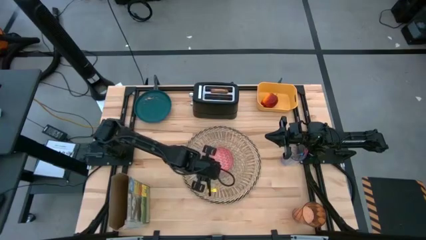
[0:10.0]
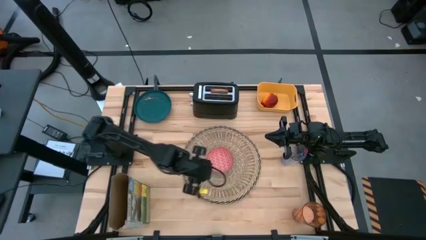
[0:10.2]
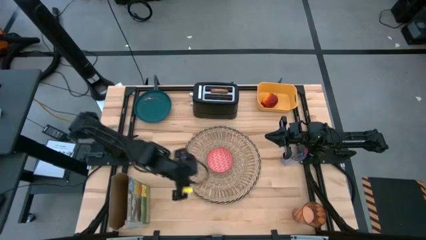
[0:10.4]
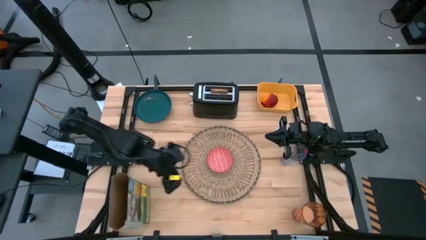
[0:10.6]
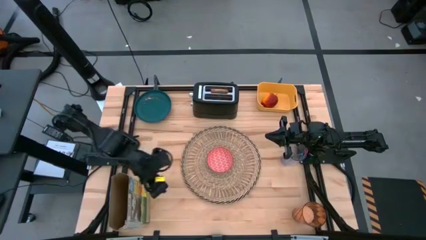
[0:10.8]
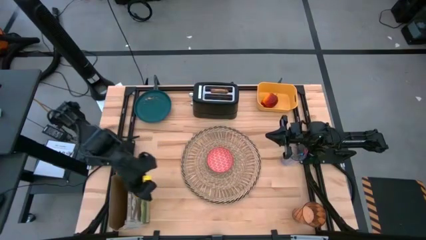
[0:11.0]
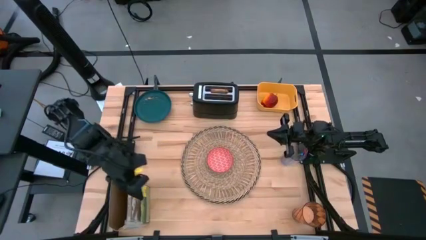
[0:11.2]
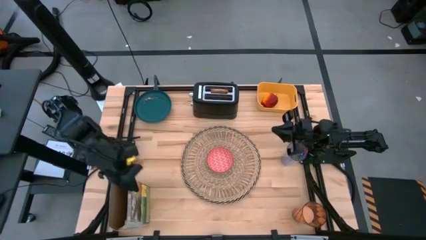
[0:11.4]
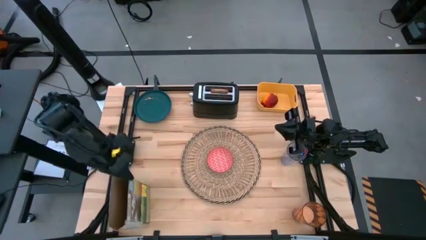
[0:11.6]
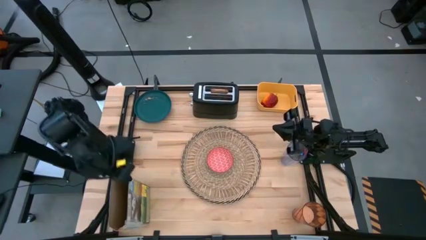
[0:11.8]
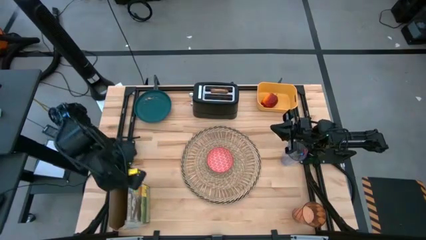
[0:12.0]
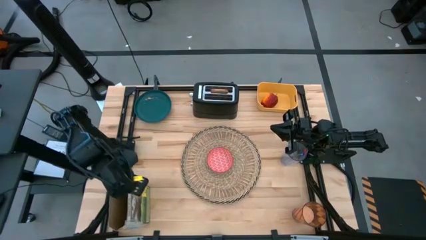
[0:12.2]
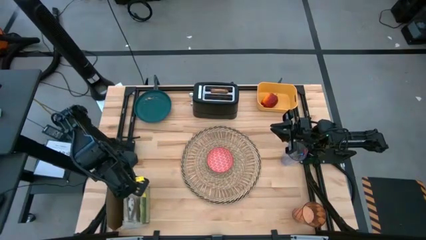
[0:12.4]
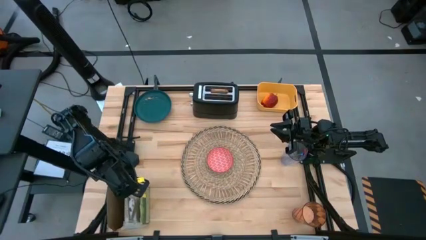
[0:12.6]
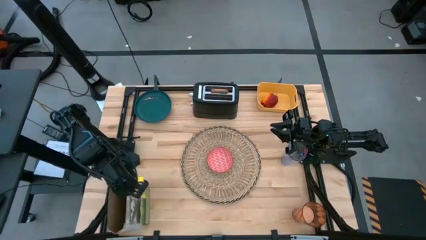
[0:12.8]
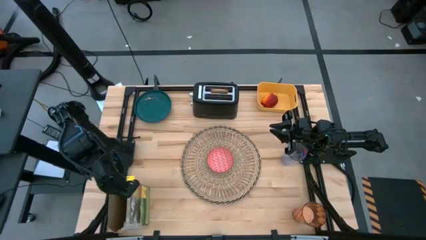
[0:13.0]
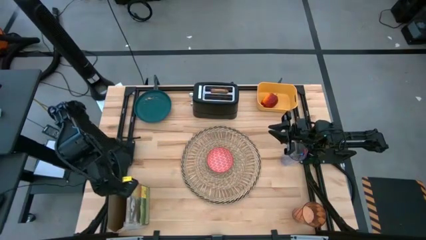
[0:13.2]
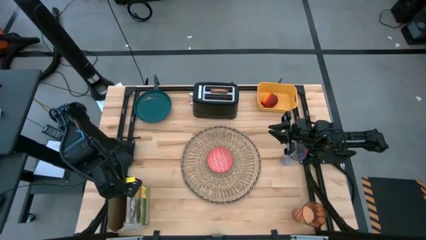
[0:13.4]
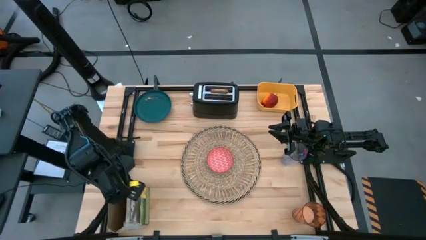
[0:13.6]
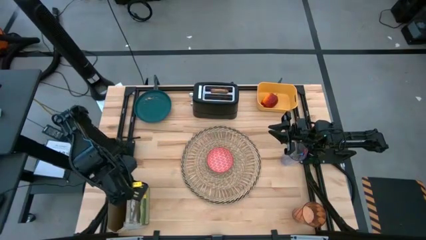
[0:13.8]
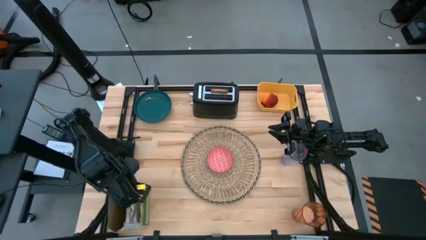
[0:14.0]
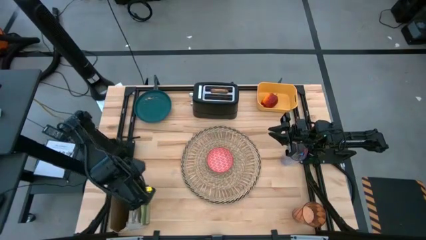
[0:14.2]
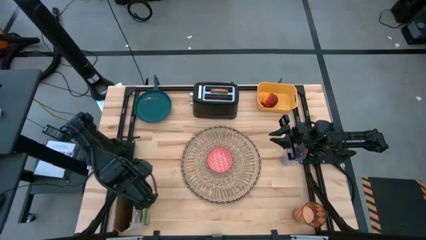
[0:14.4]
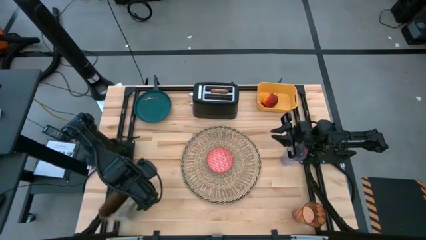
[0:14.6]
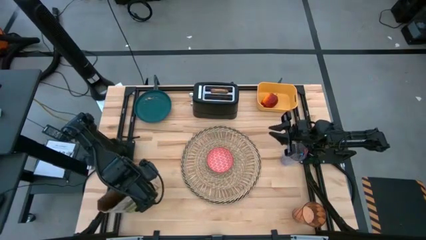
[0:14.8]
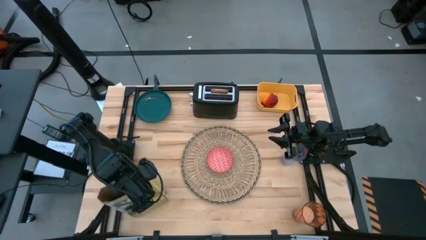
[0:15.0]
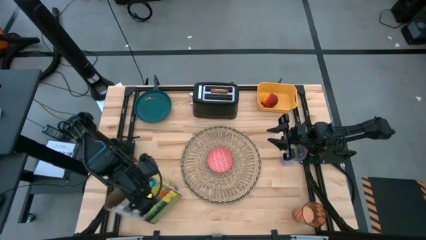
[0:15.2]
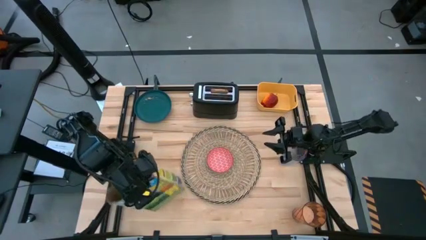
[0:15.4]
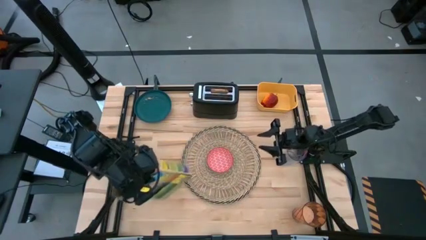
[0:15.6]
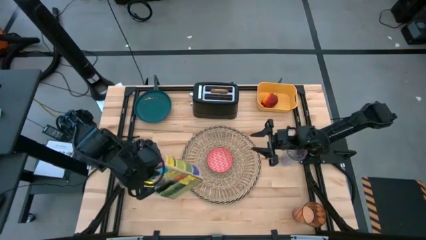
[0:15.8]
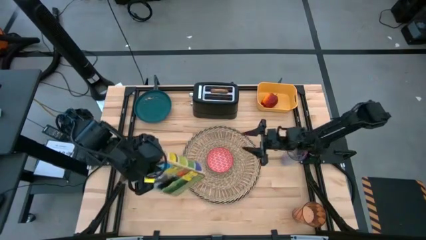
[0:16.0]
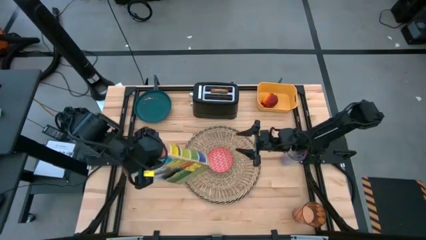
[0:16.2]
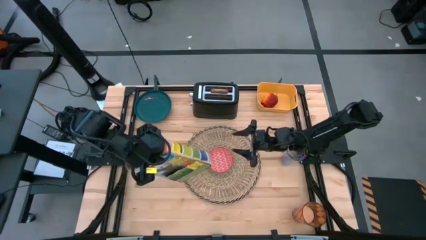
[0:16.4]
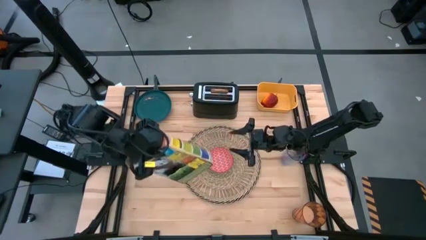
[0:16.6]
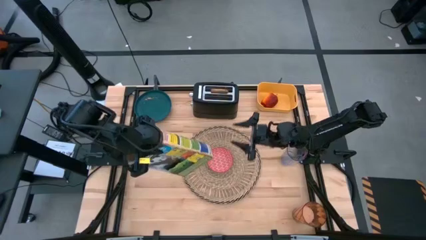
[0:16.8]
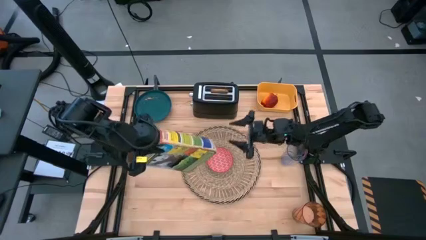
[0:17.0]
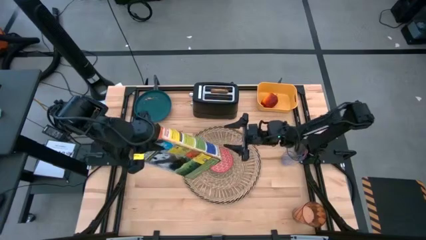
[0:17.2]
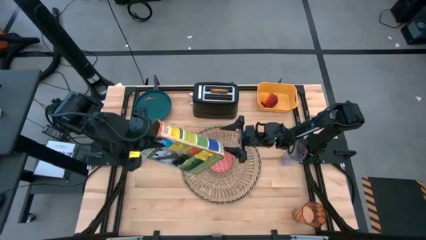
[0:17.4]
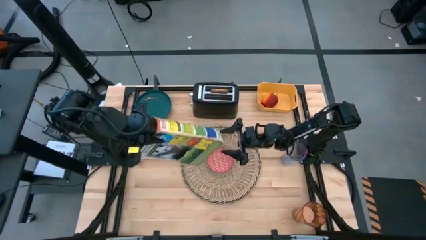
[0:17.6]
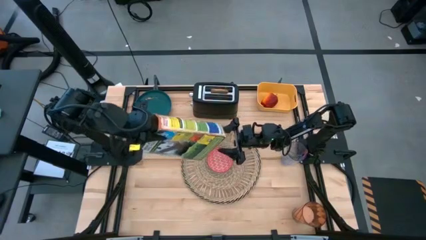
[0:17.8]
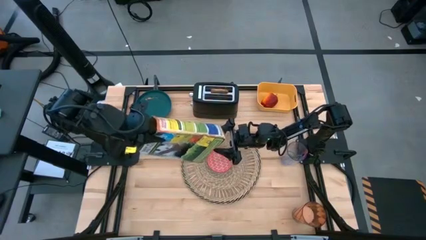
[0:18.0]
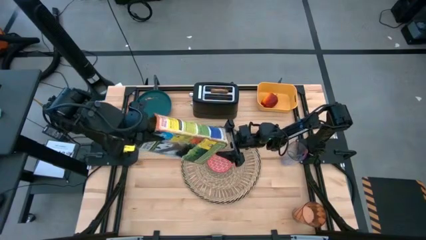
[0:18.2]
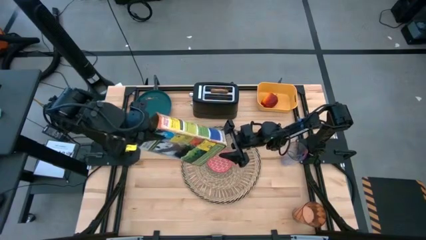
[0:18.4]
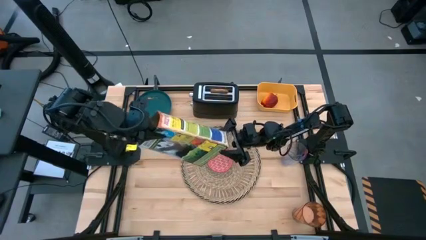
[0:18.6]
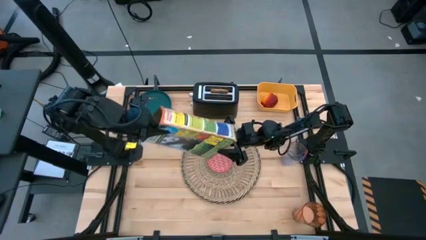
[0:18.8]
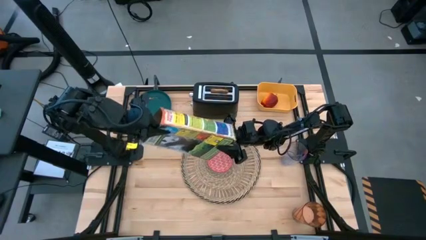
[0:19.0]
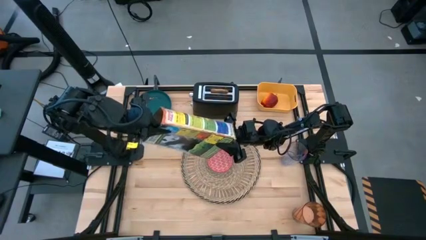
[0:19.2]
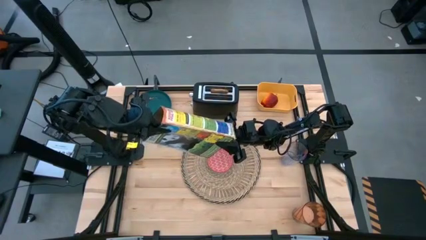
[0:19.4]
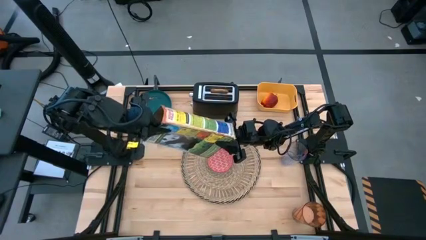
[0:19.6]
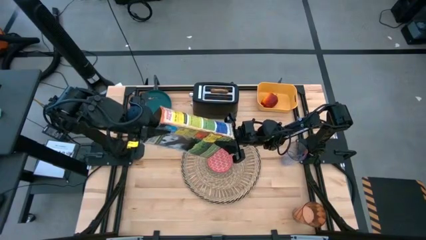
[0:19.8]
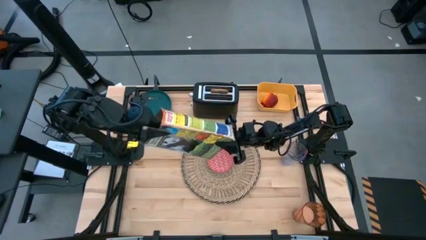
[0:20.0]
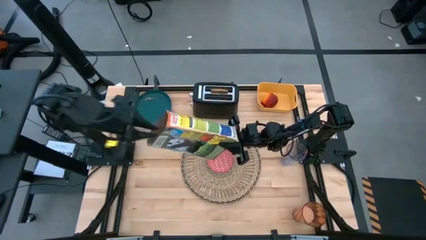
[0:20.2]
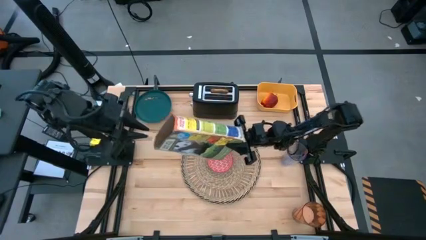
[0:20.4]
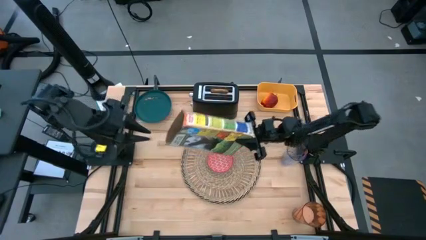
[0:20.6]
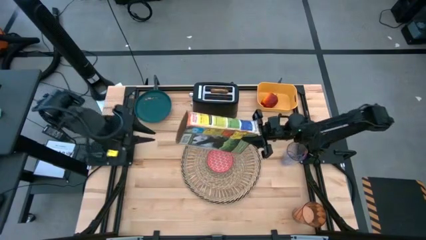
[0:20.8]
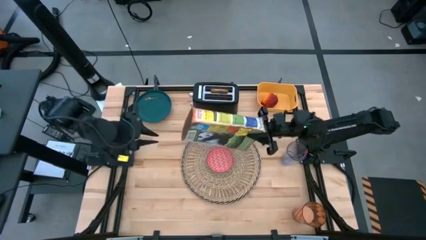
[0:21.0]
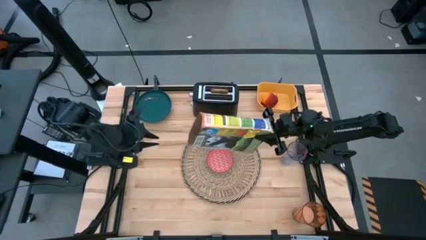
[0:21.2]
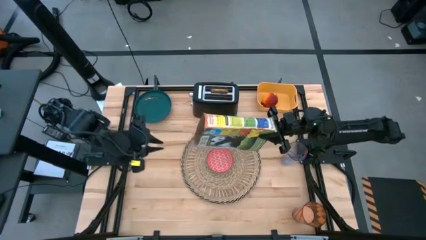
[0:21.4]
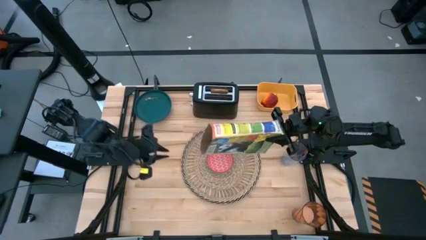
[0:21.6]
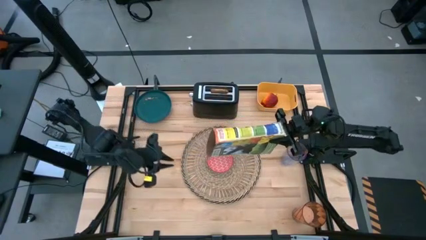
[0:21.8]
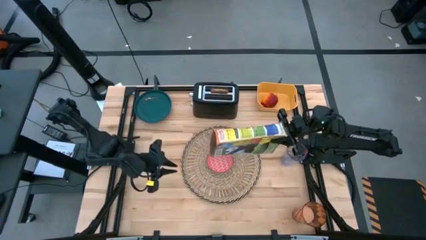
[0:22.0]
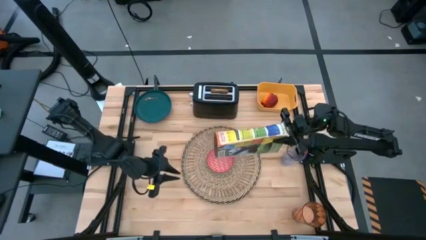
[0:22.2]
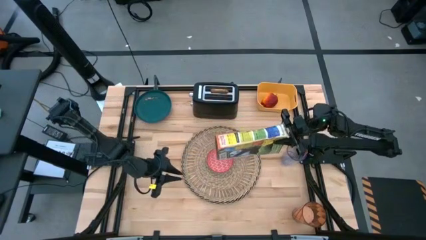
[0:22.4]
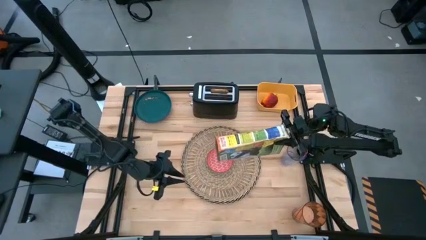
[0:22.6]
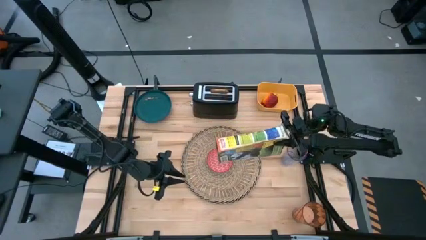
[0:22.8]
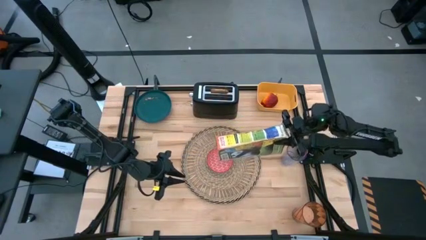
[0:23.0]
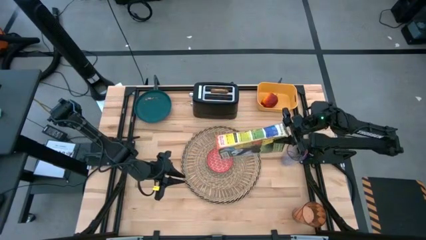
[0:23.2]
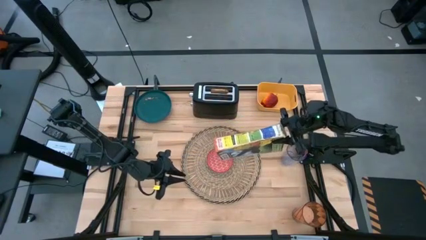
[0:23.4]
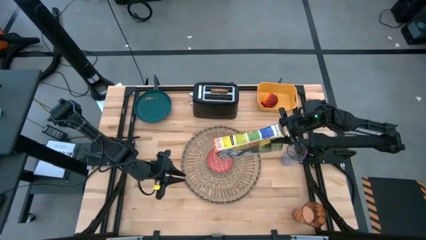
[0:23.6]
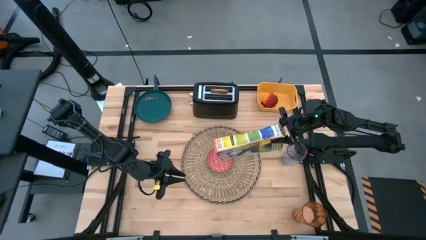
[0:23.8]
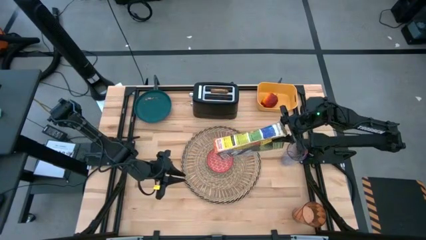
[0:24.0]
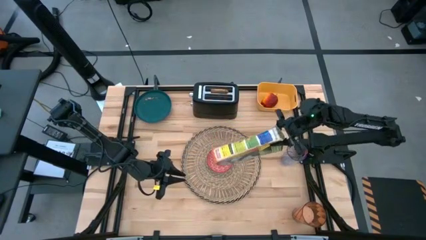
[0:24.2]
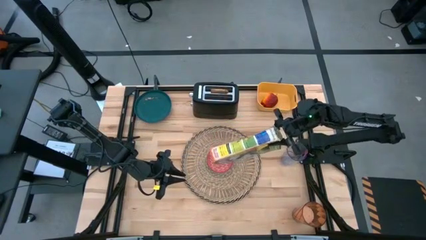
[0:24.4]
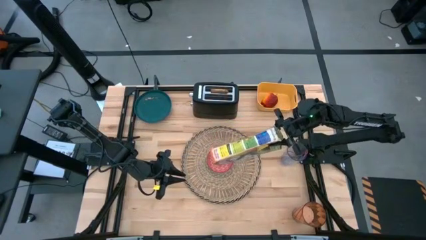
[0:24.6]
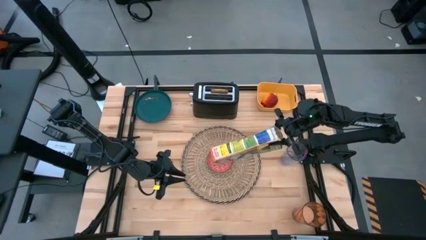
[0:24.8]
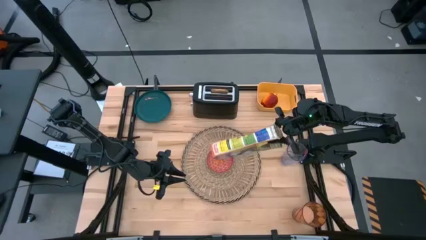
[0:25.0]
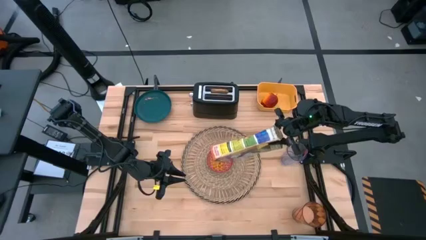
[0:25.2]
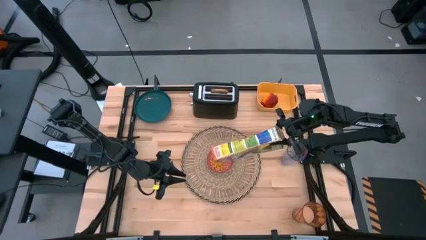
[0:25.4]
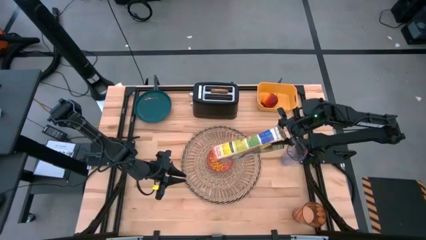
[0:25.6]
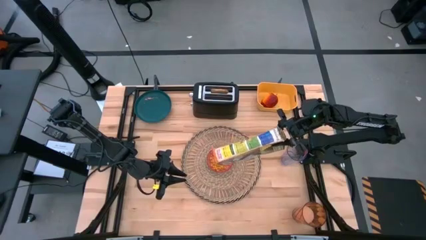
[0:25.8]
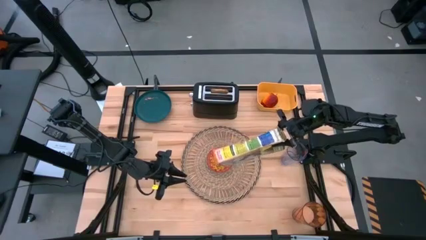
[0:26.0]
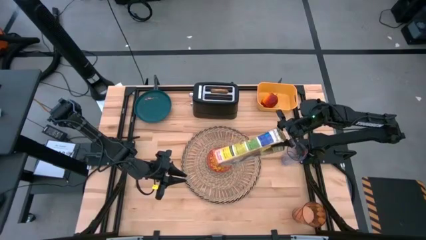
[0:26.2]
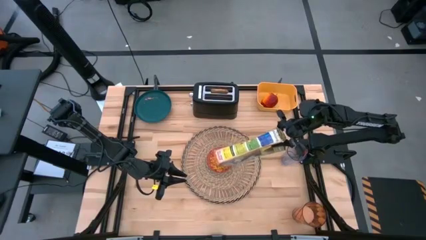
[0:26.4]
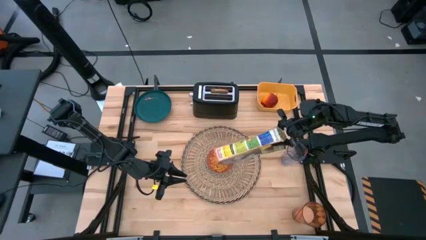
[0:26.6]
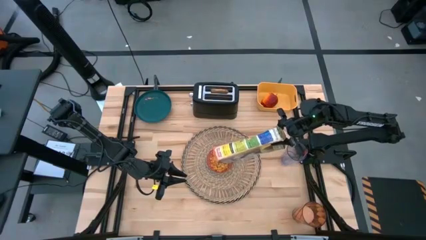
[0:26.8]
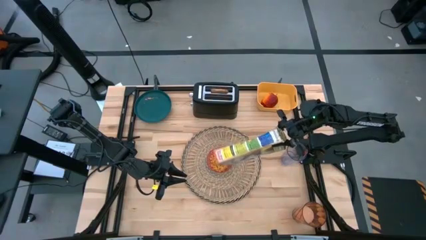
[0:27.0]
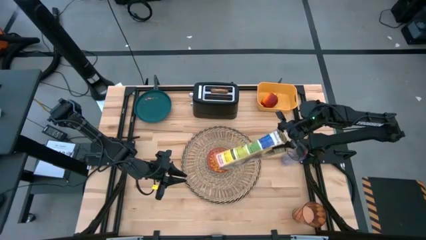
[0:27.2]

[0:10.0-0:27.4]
Task: Arrange a breakfast setting
Pour the cereal from the yellow cereal box into the red bowl
